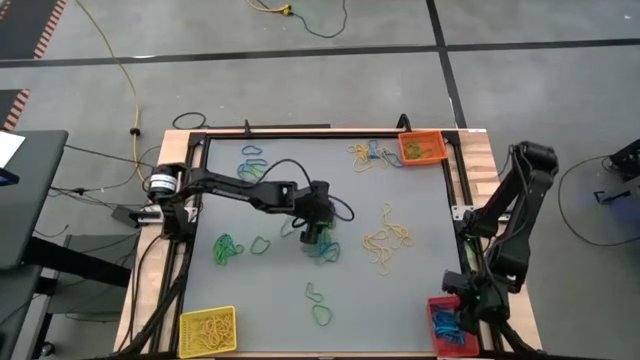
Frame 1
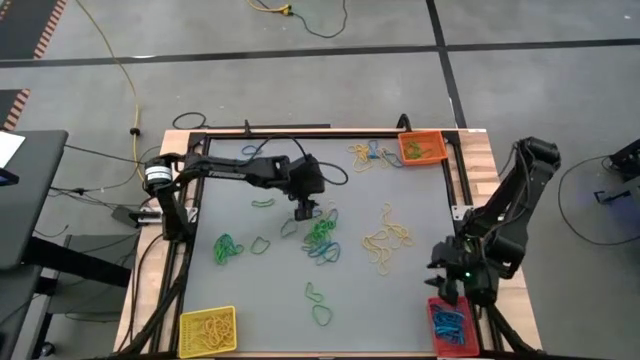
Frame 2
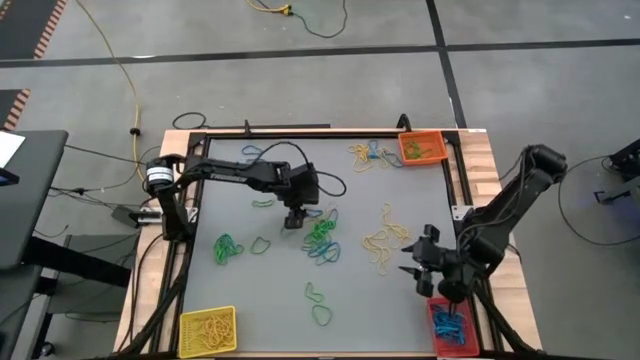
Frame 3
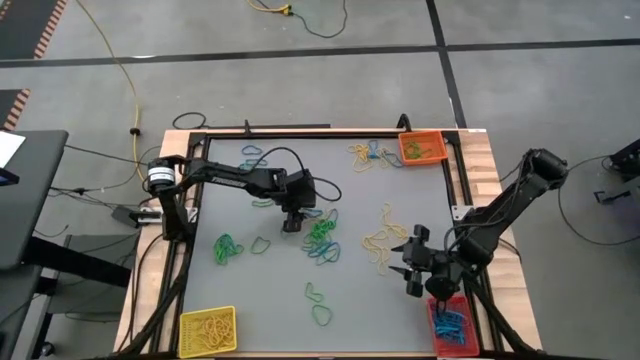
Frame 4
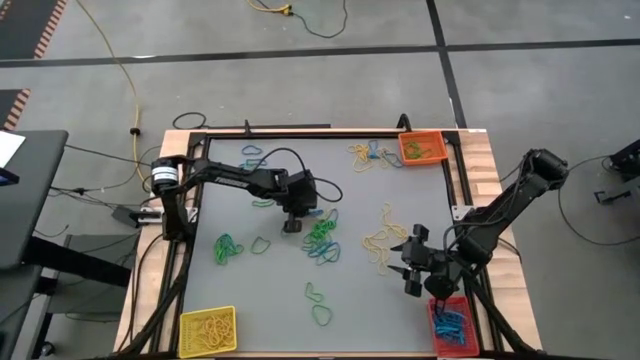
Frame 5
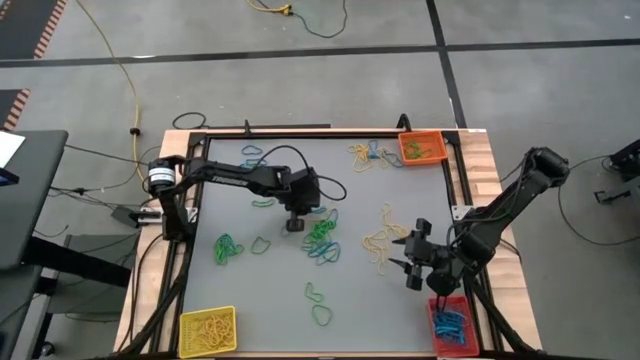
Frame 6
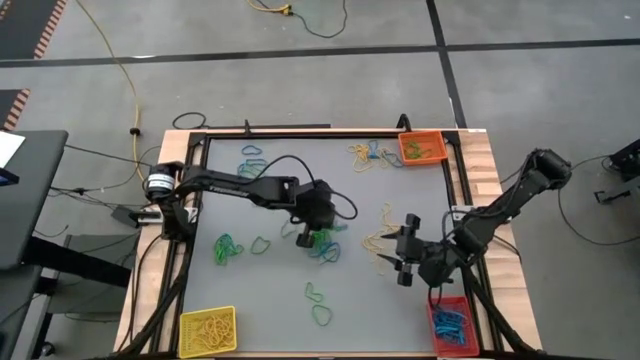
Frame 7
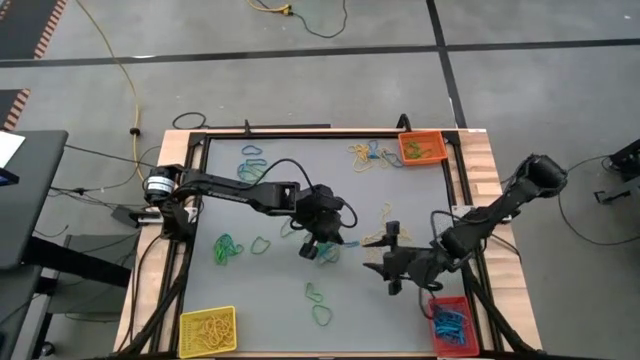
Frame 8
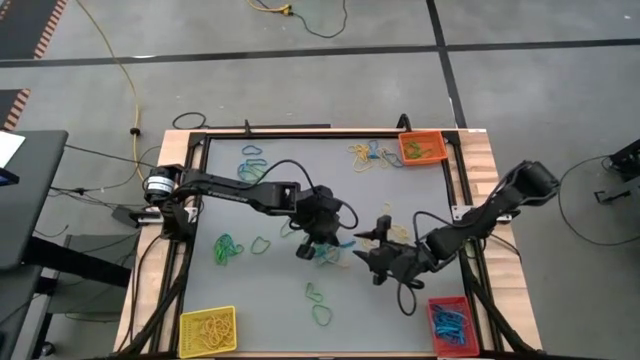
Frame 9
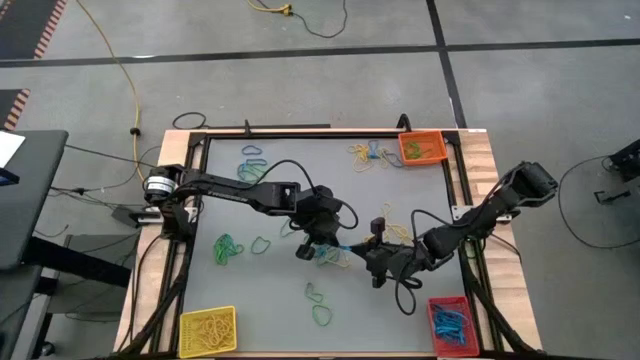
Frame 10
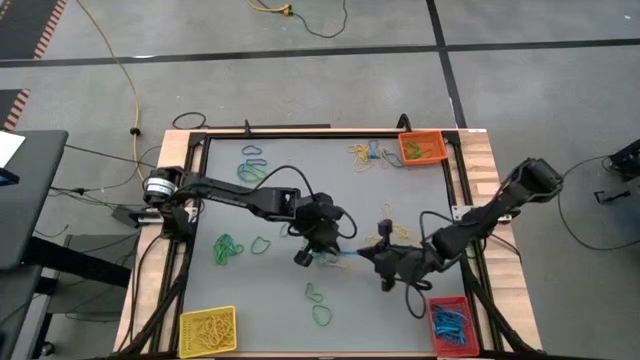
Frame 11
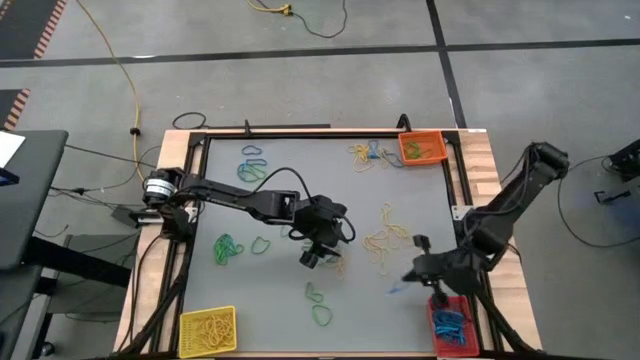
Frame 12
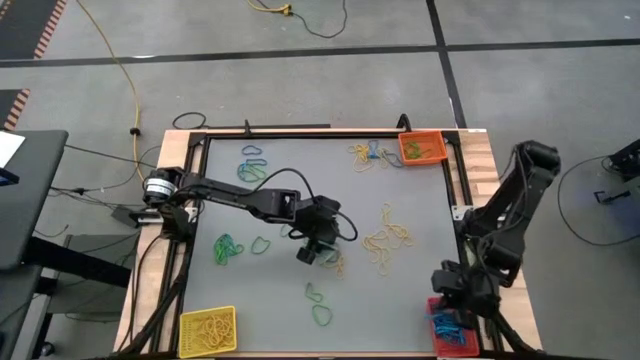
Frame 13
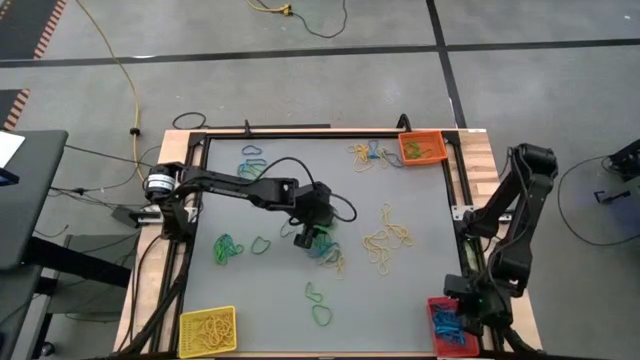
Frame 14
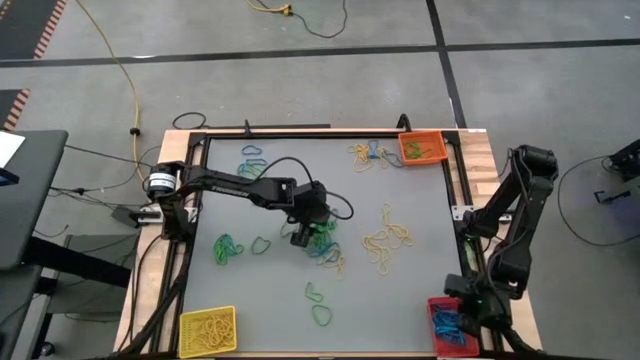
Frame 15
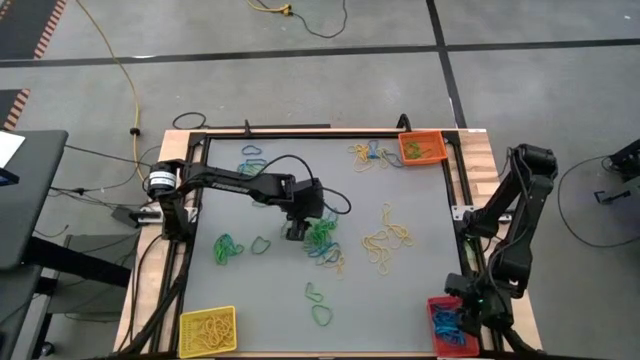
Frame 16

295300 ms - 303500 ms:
Task: Sort rubber bands into baskets
Put the blue rubber band into the red bin

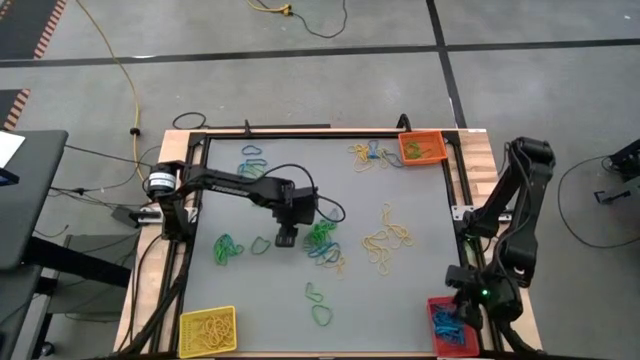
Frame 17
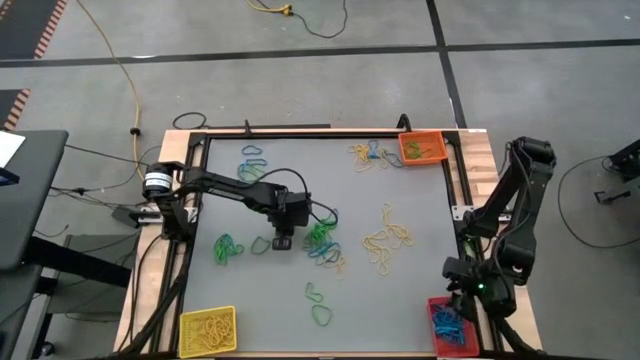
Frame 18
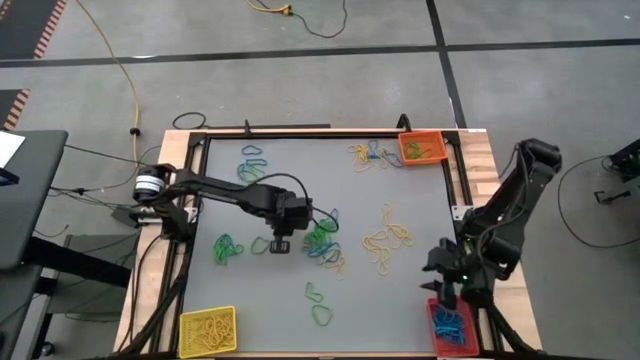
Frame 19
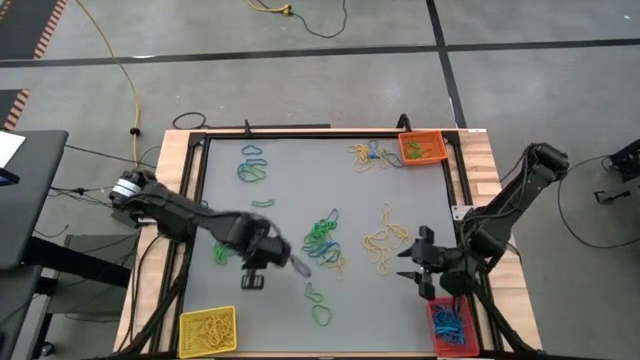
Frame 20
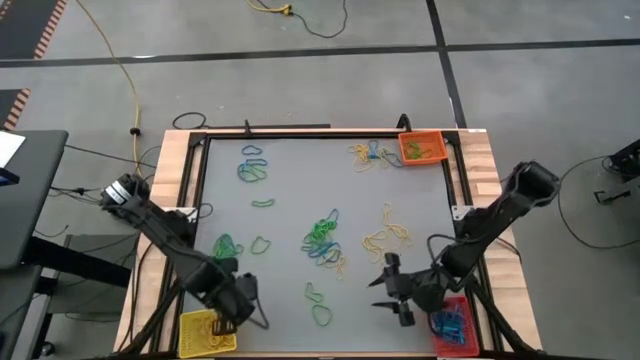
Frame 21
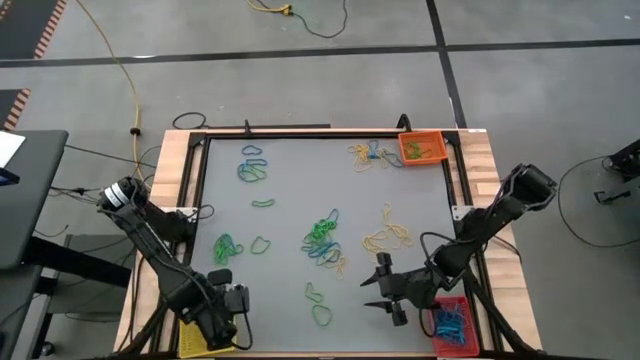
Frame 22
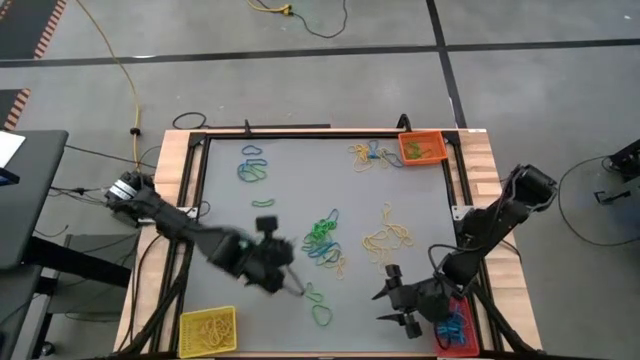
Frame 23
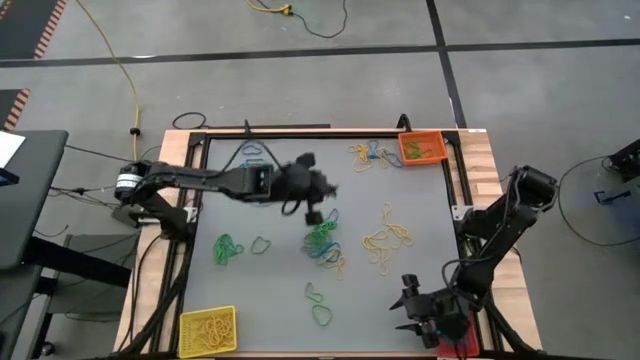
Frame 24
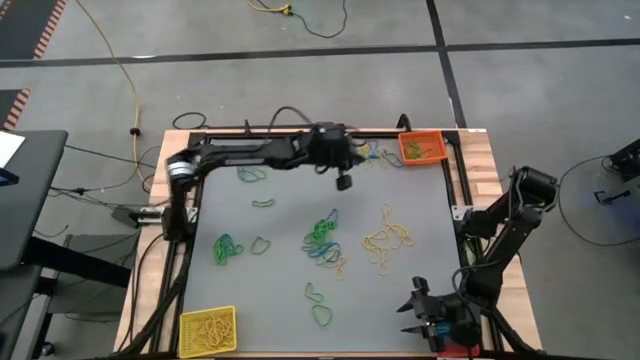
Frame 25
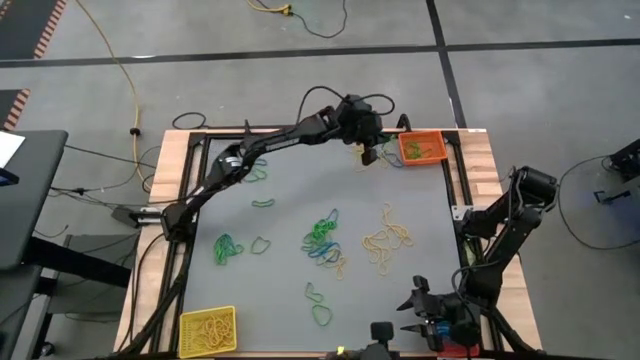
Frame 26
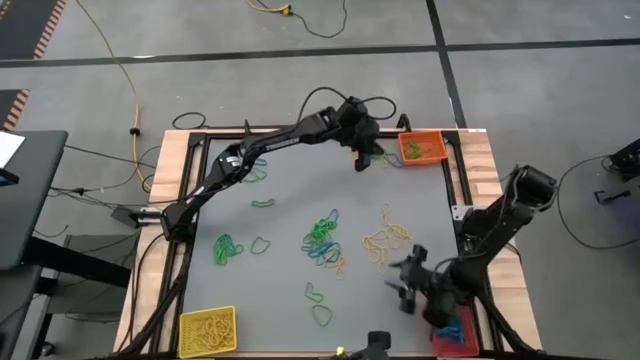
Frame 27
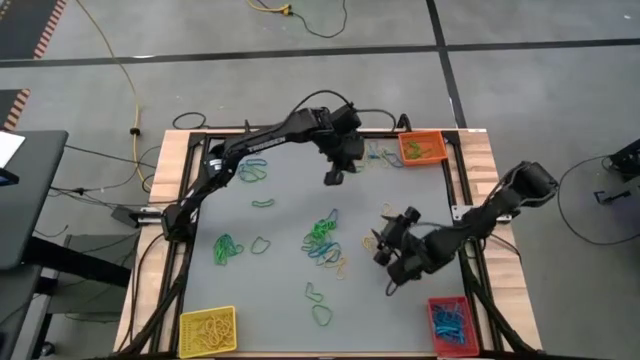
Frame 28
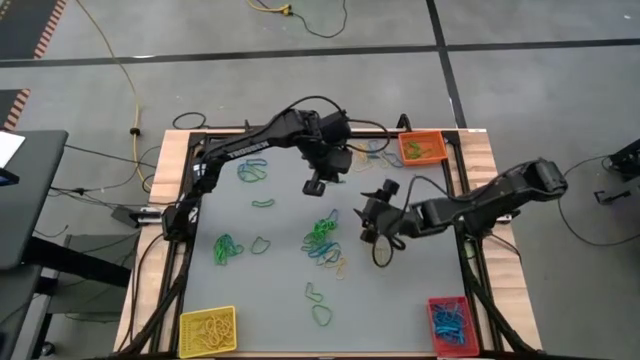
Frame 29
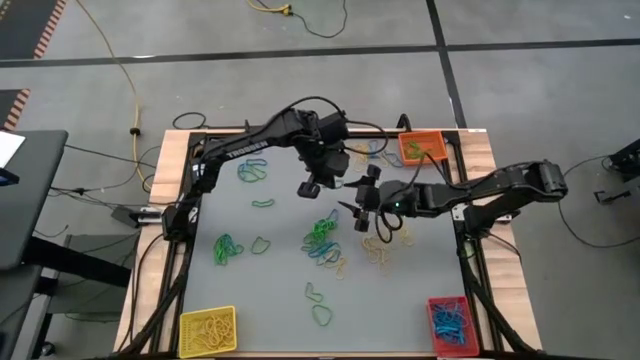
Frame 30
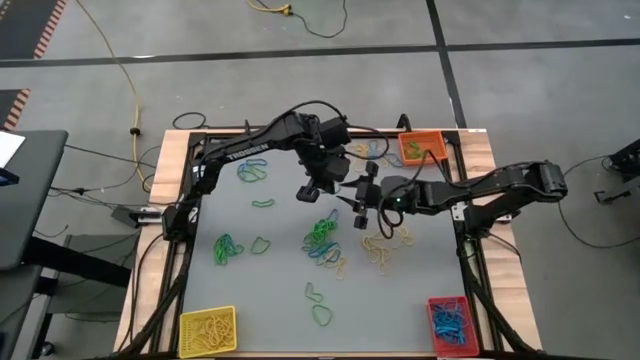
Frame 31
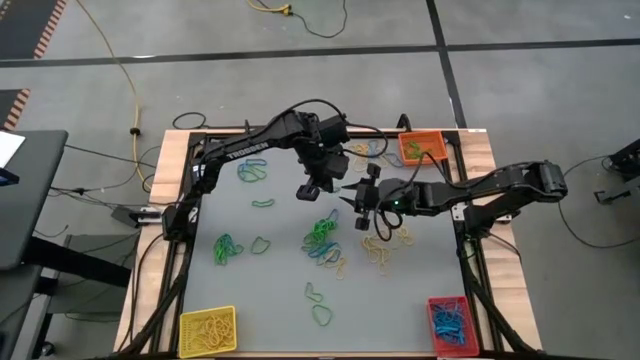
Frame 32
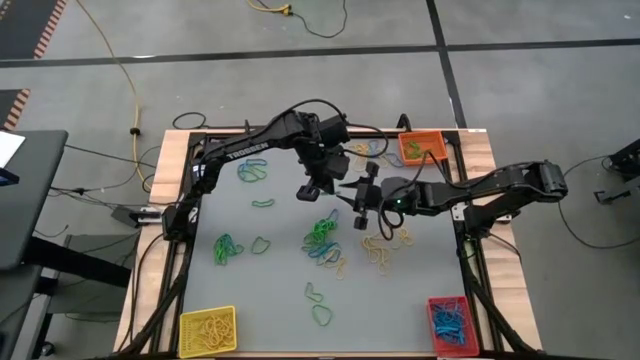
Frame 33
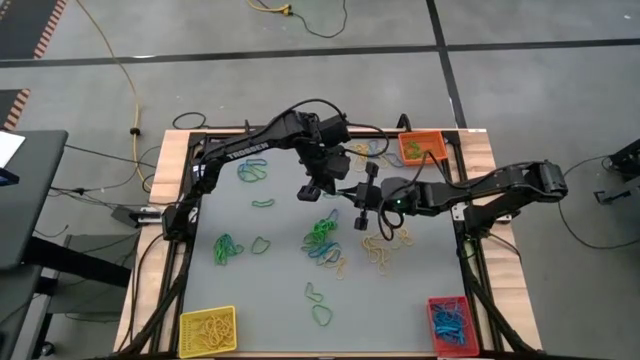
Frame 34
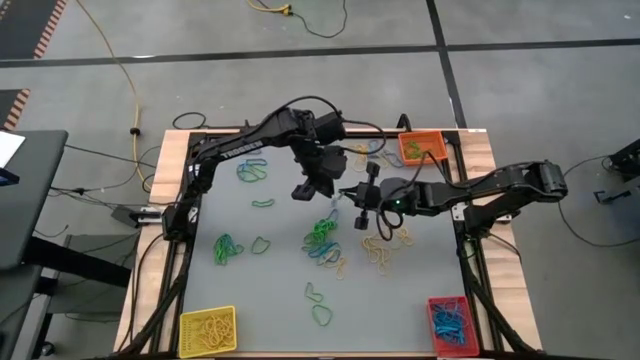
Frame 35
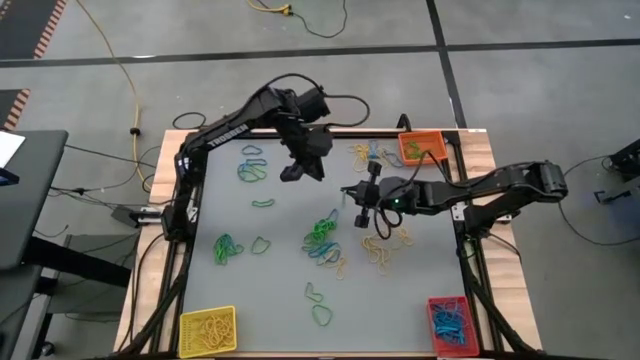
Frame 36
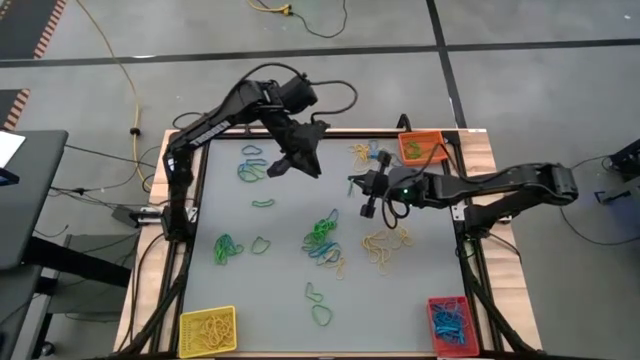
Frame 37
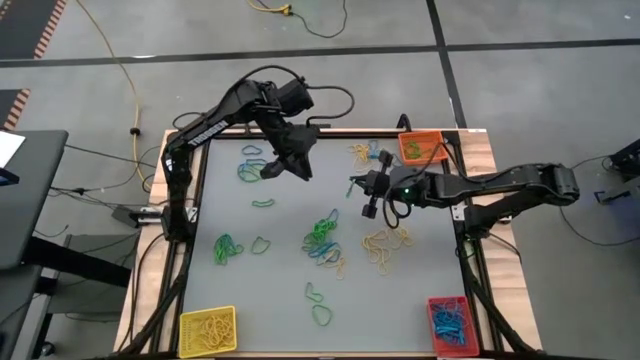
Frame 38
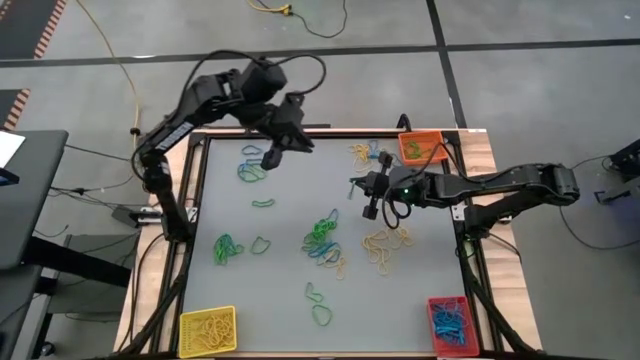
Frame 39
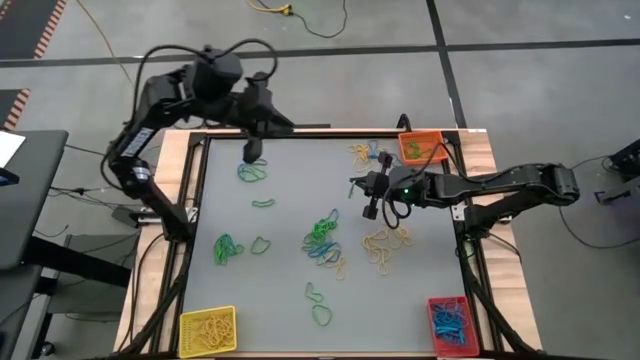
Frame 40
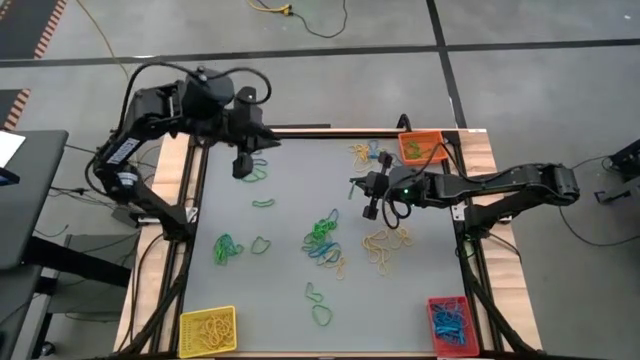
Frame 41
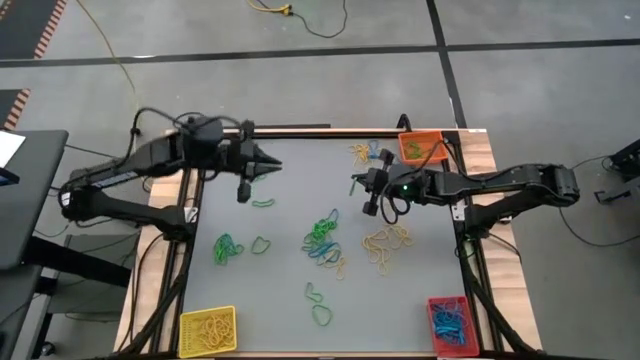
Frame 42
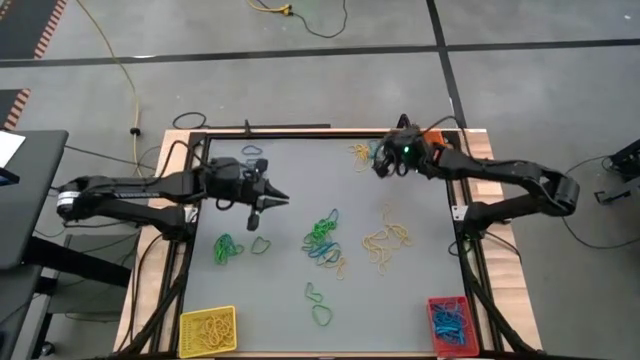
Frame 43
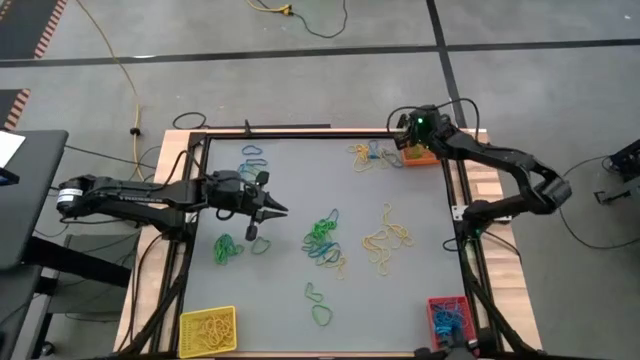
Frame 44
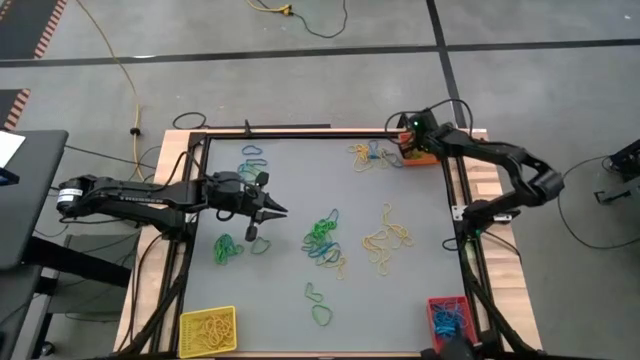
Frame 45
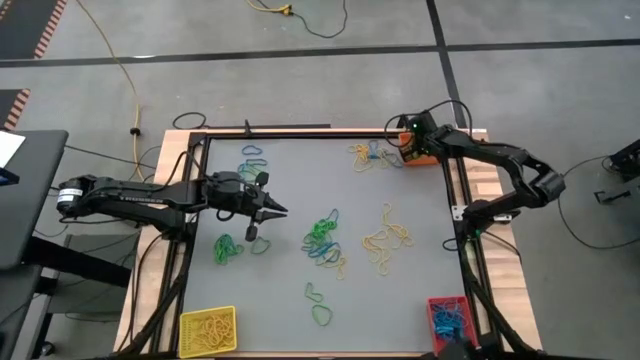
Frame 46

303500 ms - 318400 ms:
Put the green rubber band into the orange bin
